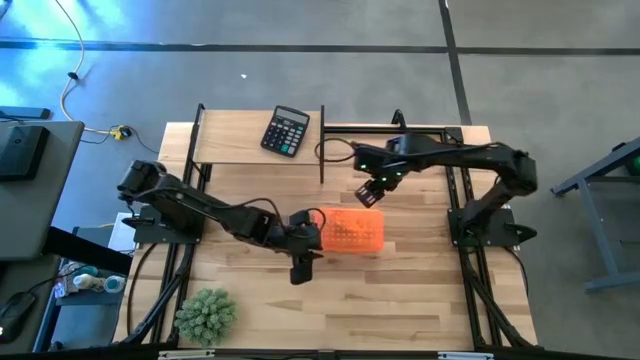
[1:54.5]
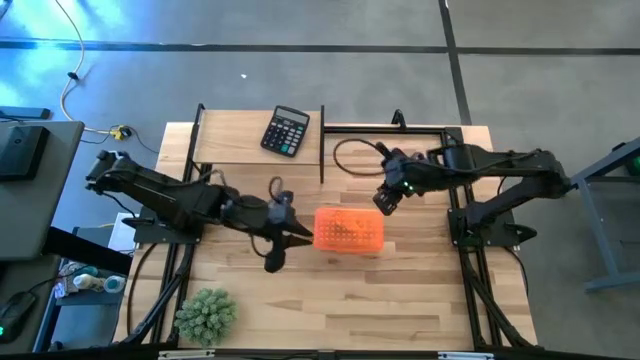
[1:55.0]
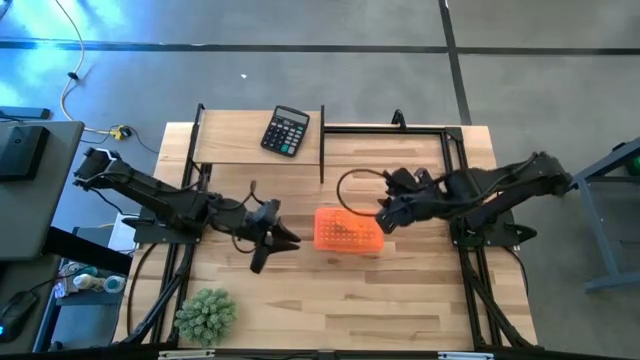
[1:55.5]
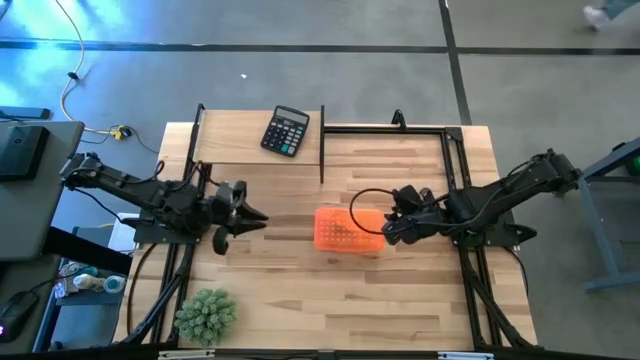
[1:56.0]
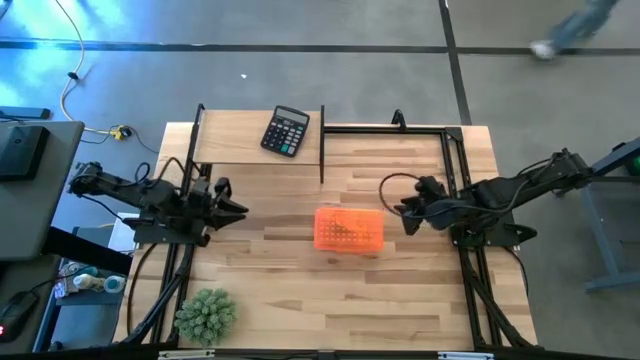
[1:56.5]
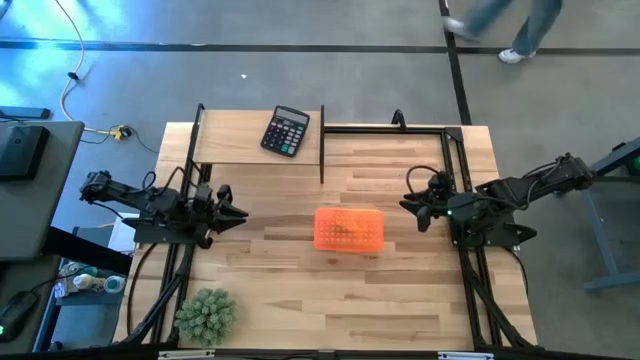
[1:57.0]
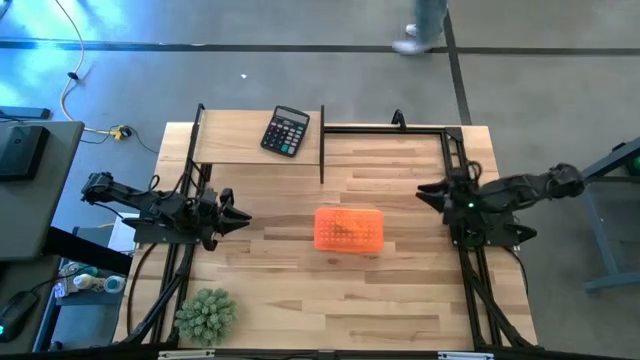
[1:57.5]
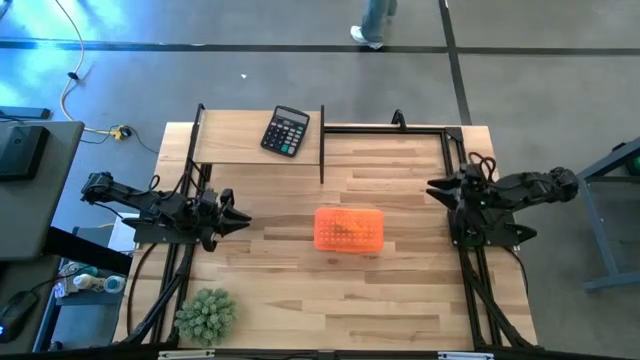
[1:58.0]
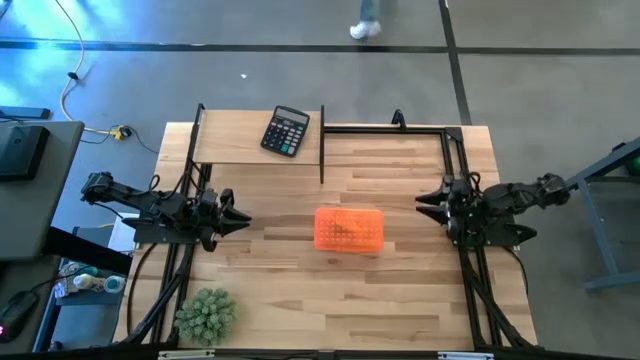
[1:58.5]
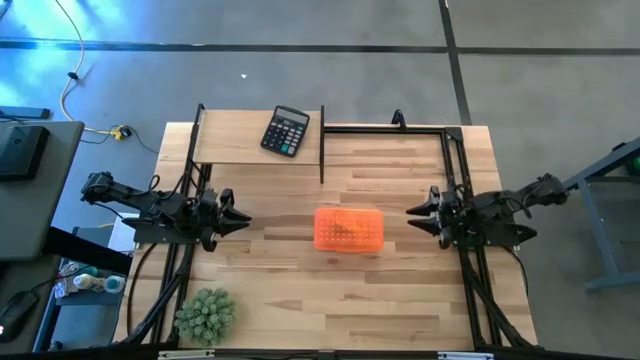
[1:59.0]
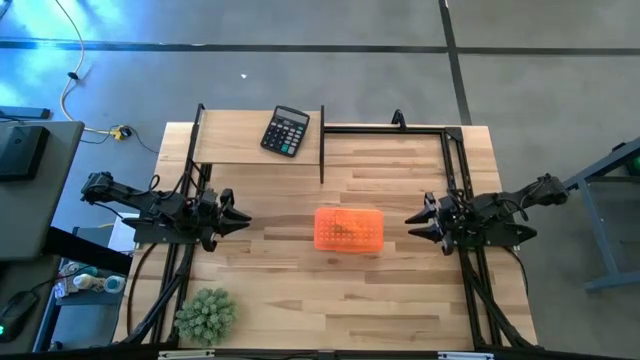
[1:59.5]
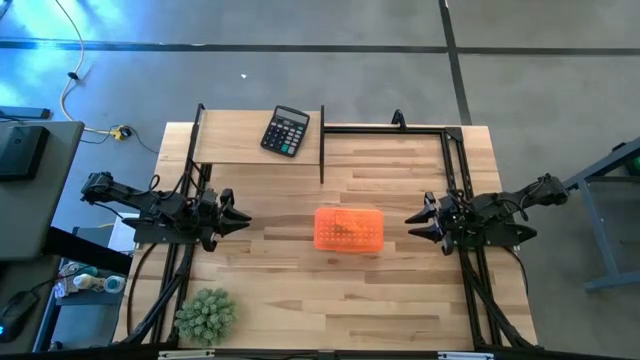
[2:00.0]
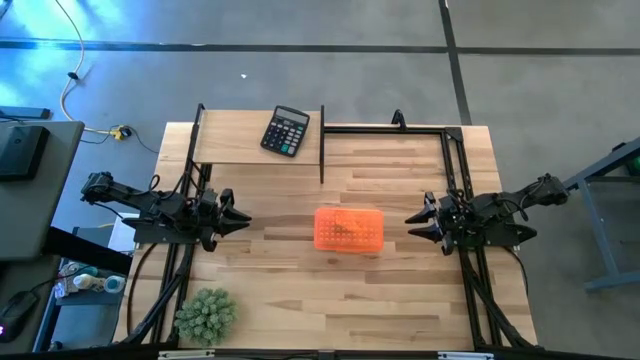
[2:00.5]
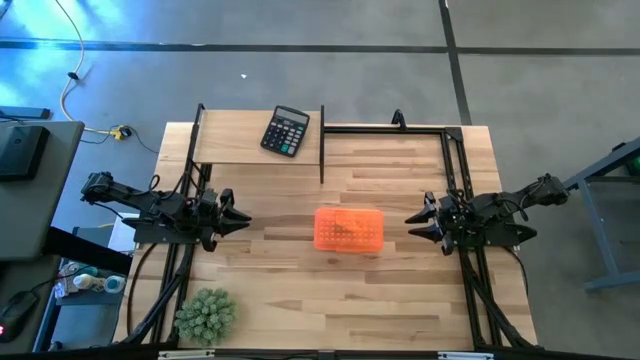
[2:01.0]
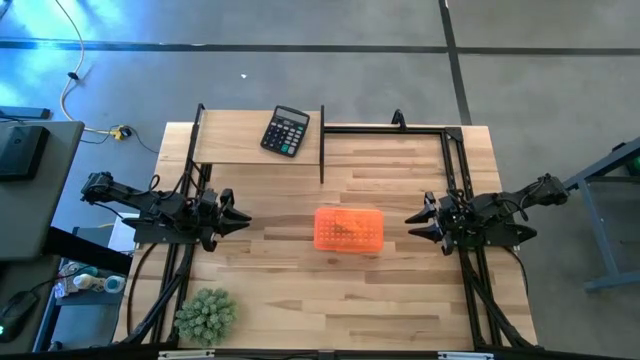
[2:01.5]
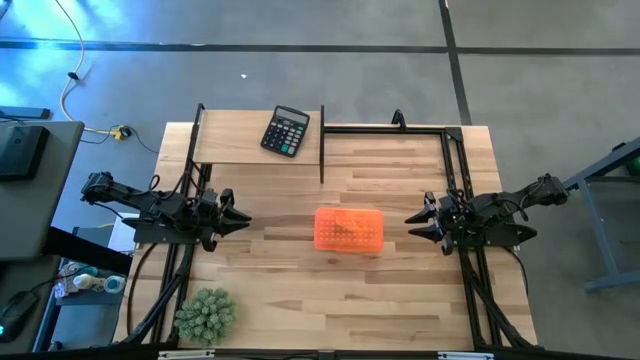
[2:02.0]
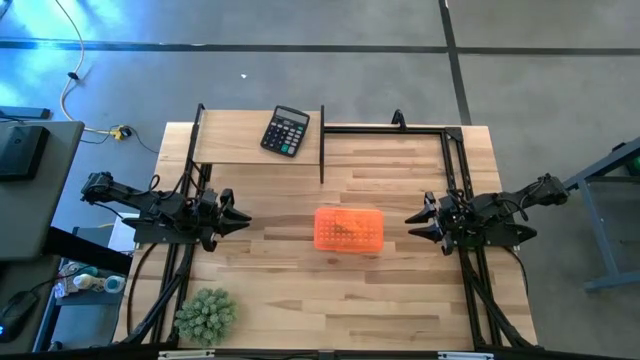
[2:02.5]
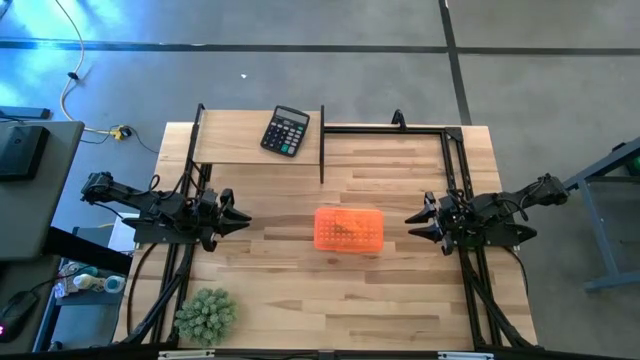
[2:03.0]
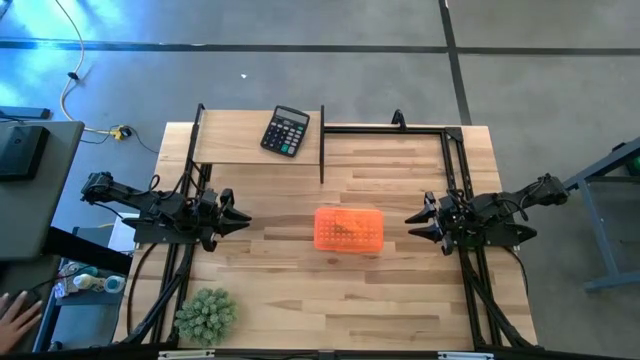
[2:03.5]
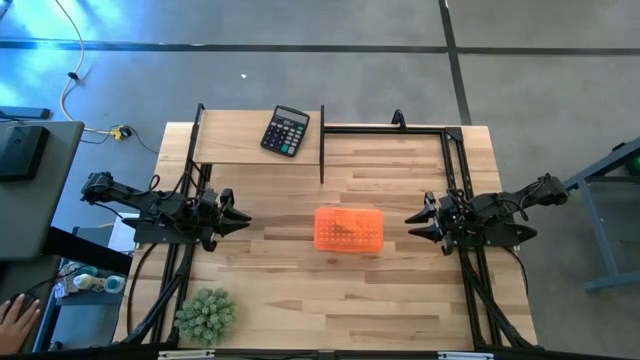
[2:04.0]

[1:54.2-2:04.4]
Task: Pack school essentials
Return to Home Position

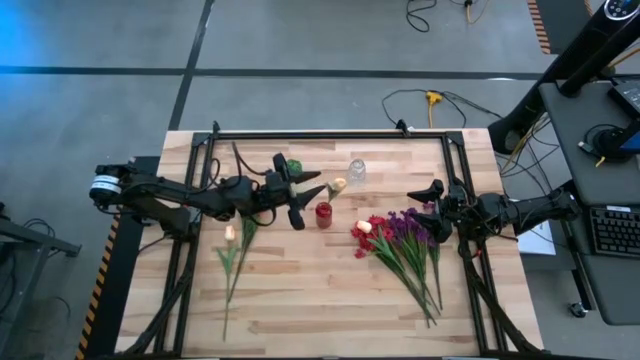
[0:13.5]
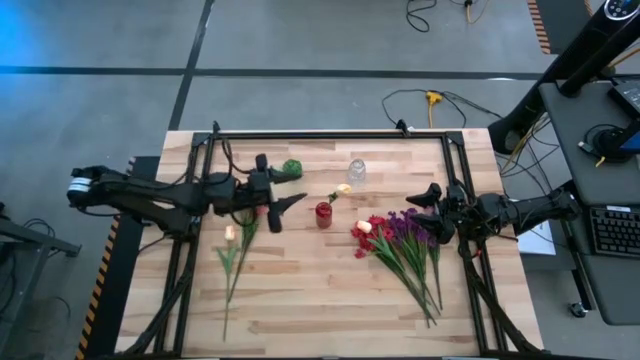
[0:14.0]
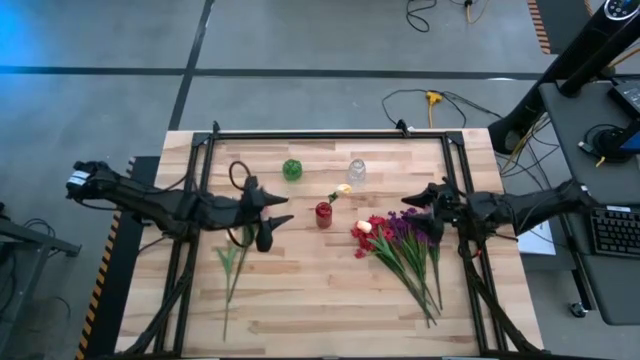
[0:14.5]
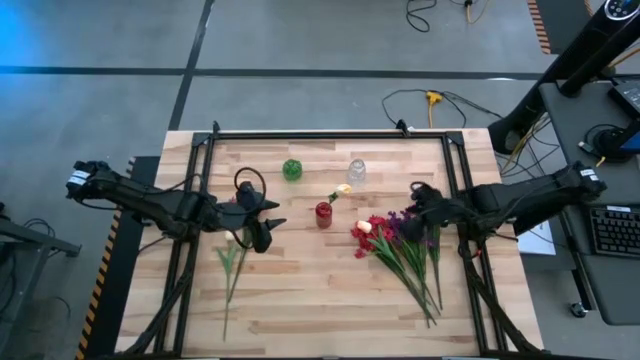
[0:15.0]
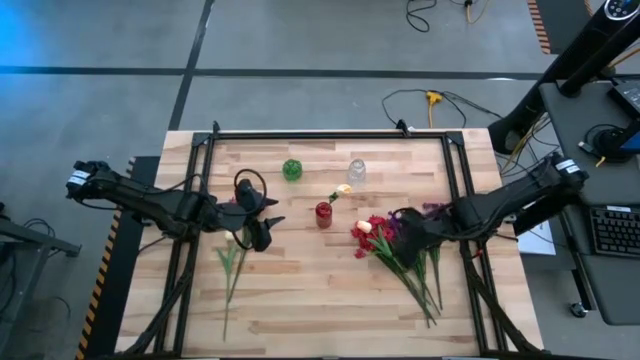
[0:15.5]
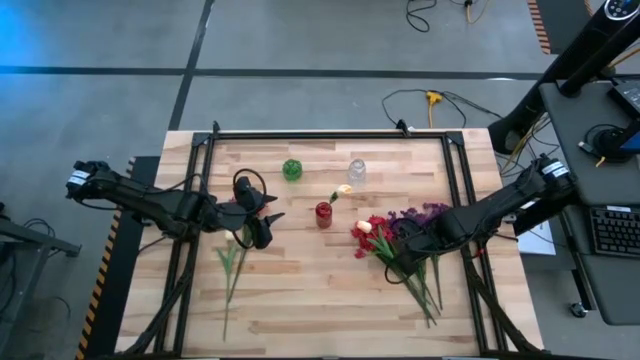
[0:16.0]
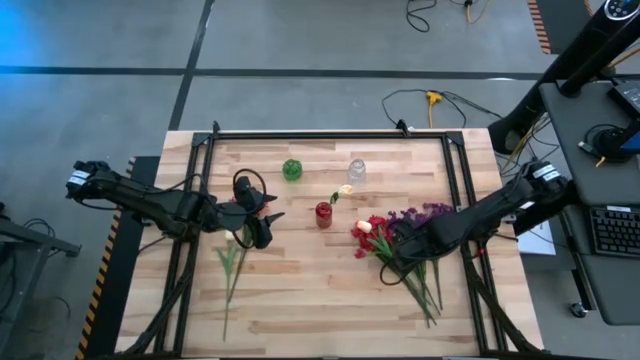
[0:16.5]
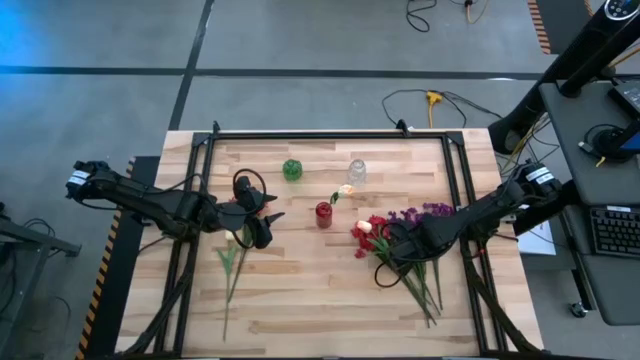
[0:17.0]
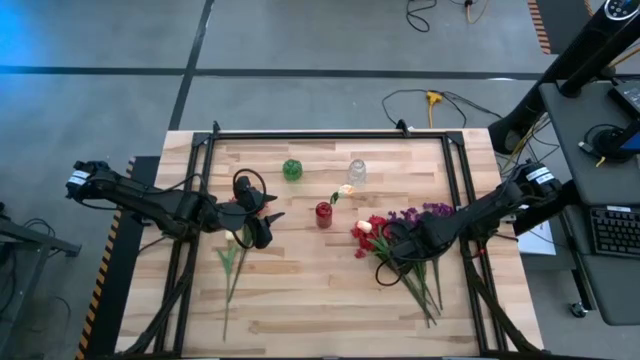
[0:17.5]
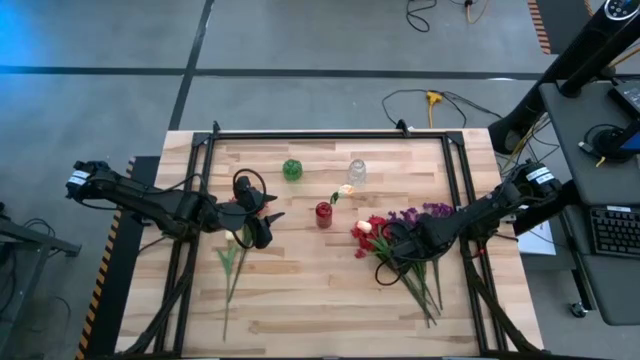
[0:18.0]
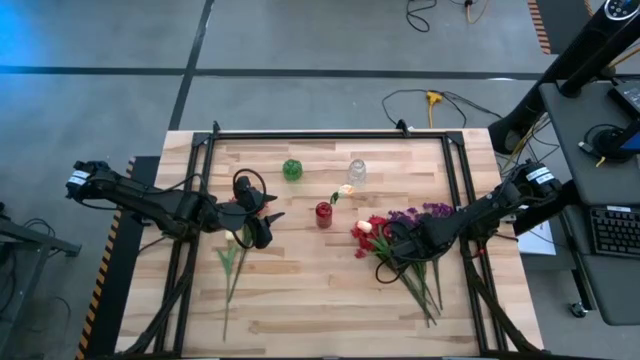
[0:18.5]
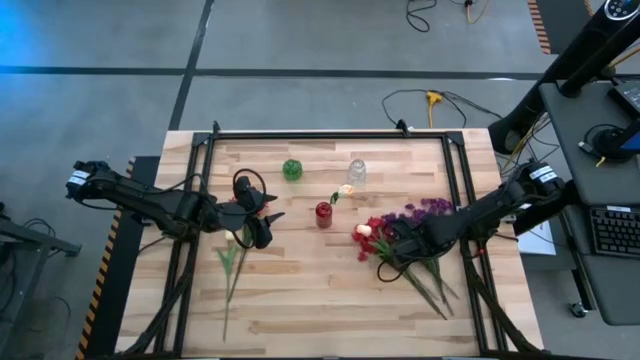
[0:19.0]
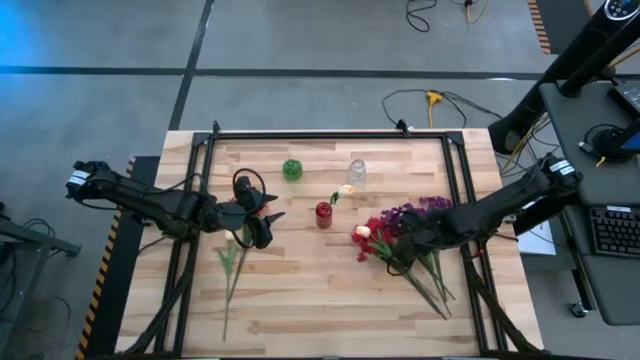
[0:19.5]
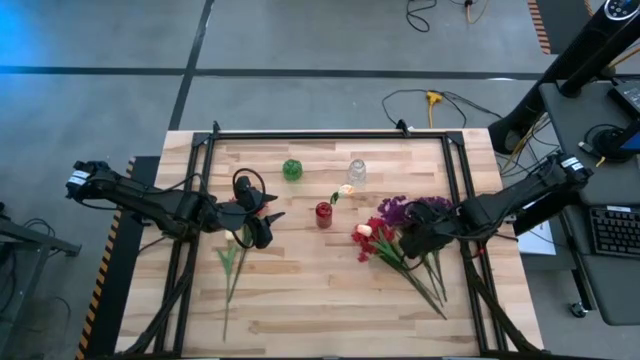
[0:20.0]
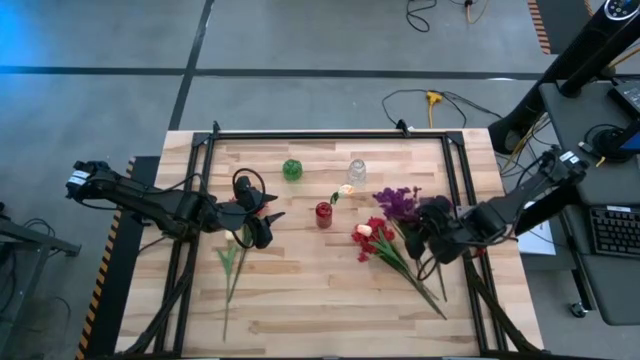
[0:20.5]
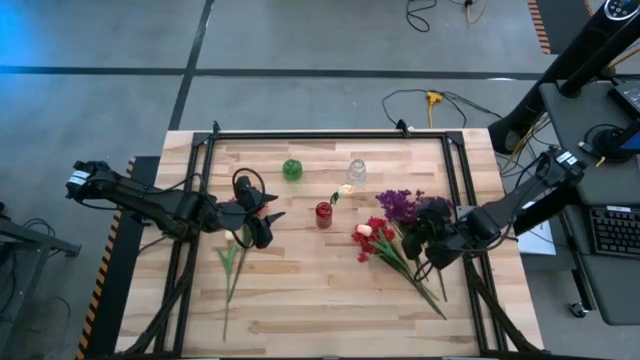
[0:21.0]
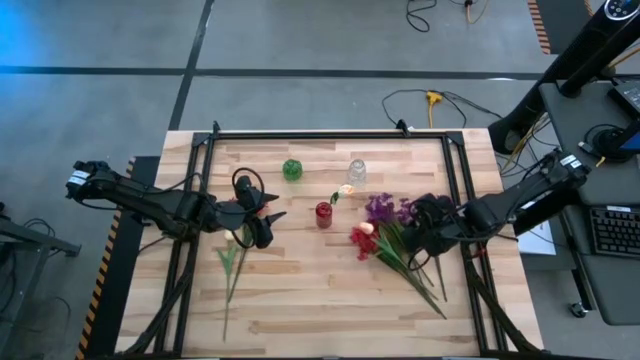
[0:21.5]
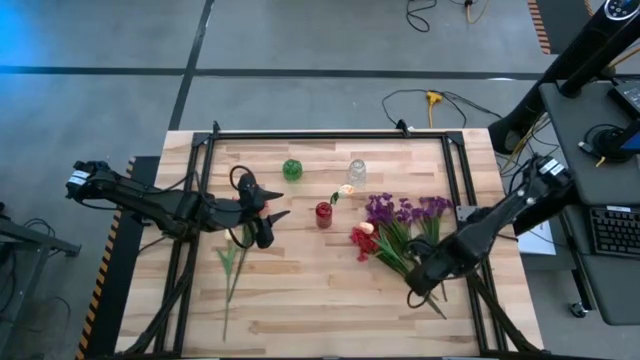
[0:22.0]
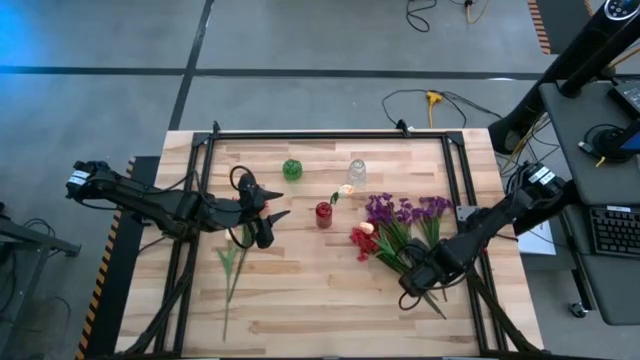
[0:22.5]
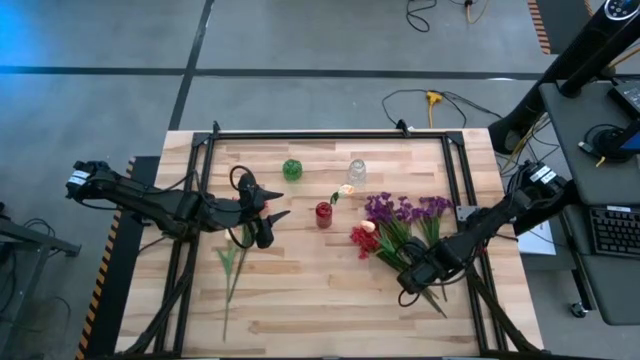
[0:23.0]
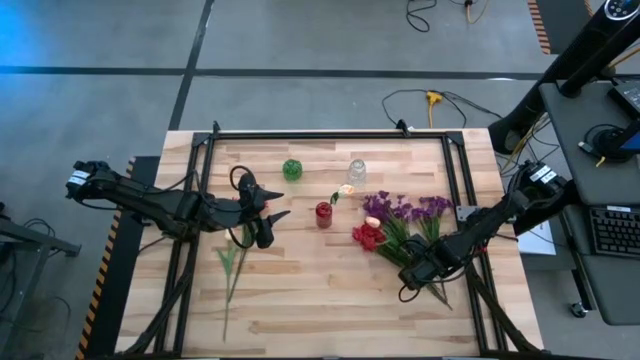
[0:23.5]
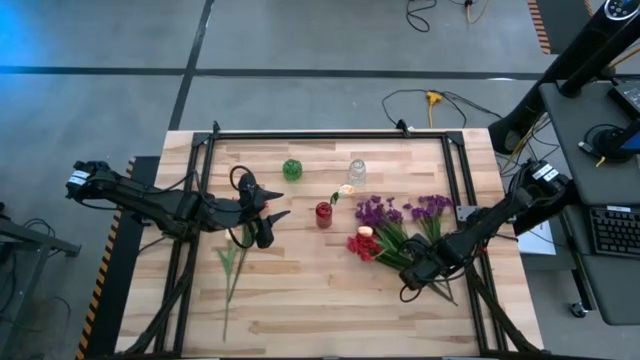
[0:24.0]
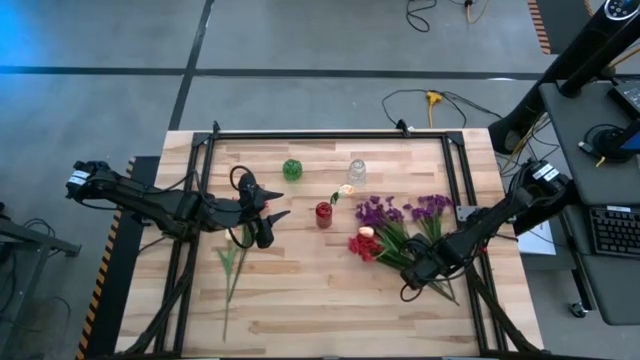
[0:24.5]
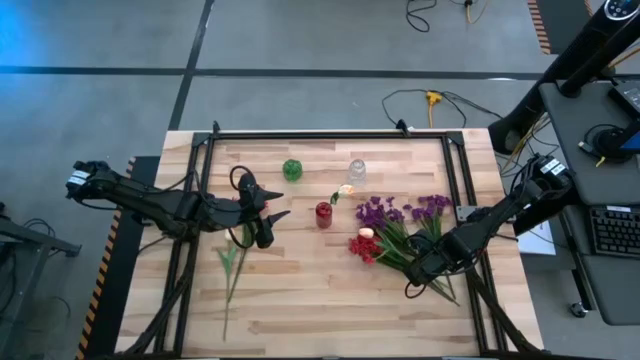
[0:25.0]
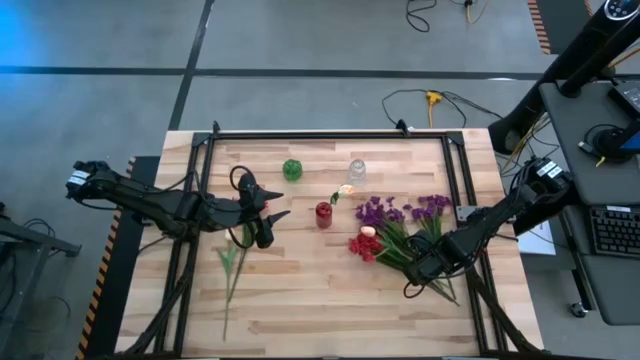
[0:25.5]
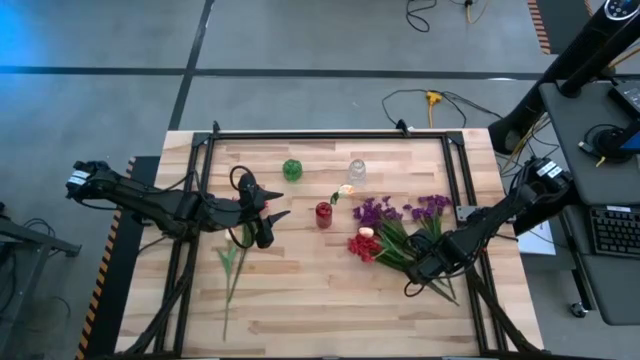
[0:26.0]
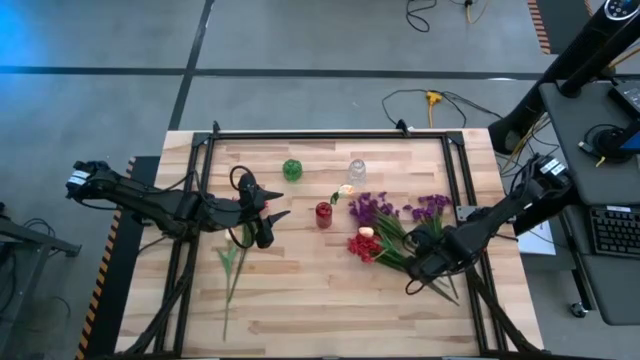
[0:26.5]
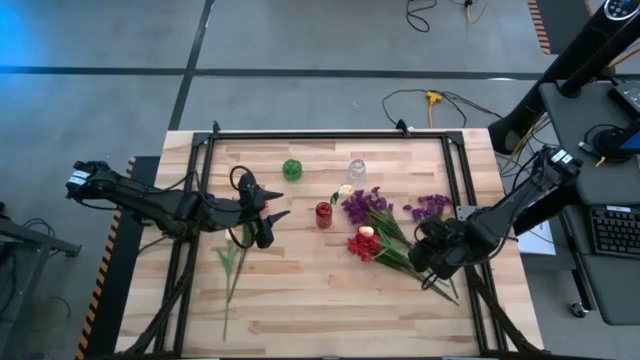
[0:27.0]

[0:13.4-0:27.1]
Task: Sort flowers into vase by color
Put the purple flowers into the transparent vase
